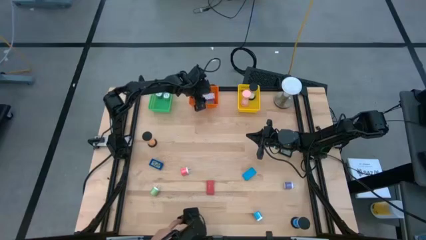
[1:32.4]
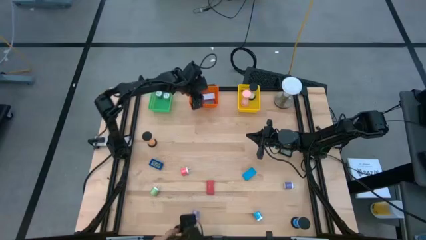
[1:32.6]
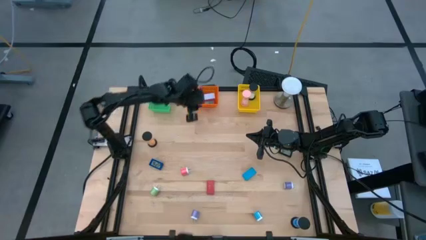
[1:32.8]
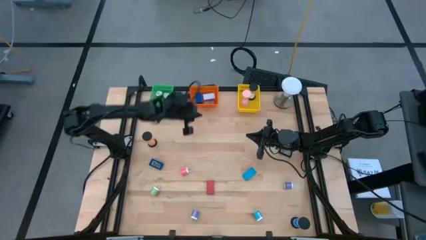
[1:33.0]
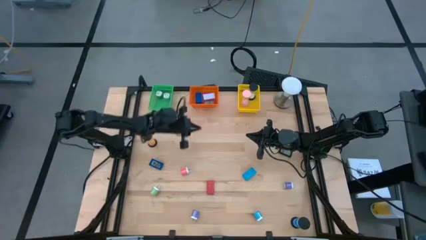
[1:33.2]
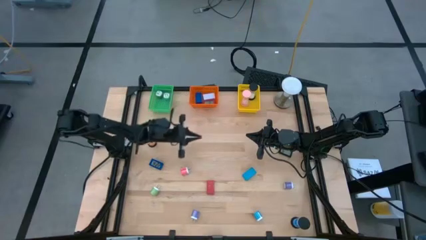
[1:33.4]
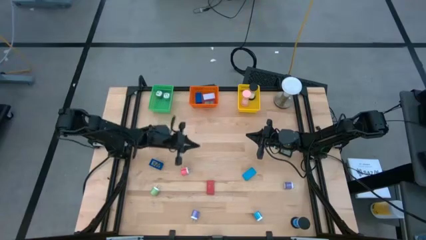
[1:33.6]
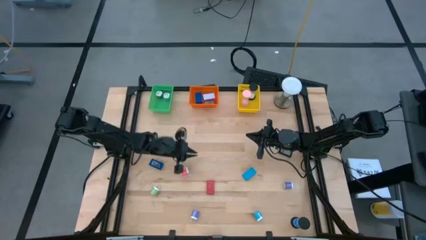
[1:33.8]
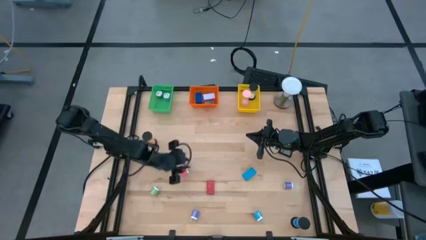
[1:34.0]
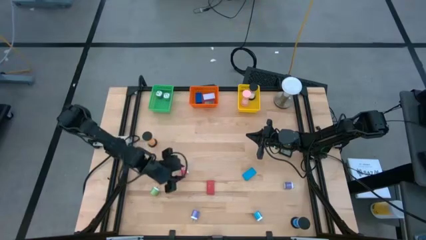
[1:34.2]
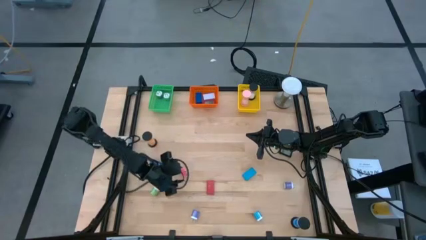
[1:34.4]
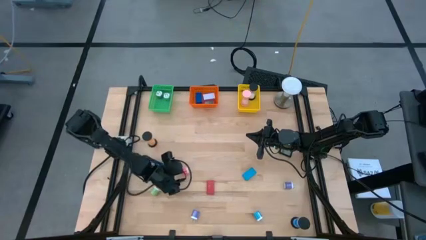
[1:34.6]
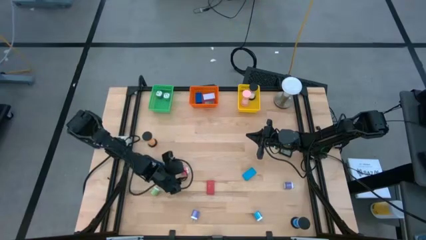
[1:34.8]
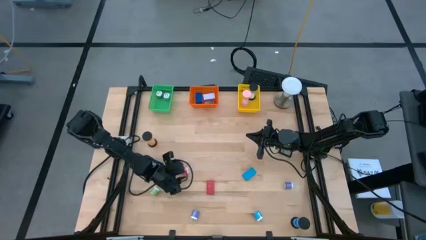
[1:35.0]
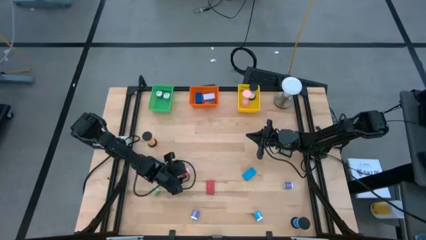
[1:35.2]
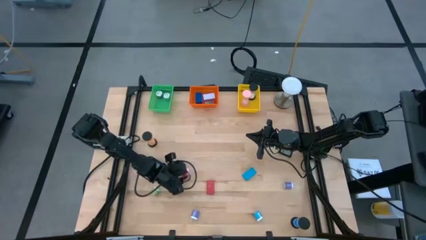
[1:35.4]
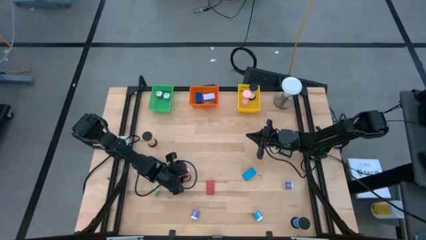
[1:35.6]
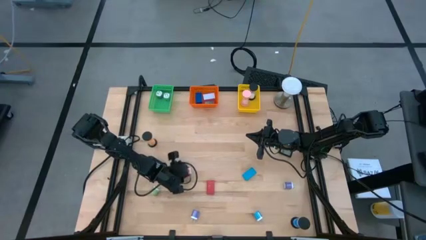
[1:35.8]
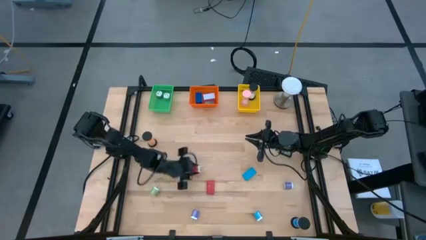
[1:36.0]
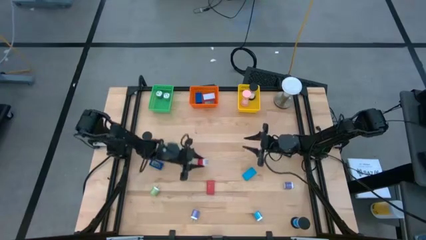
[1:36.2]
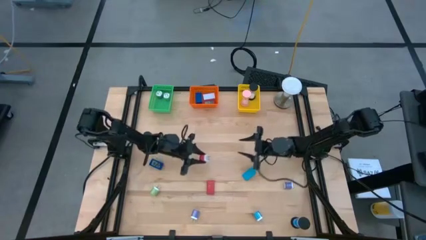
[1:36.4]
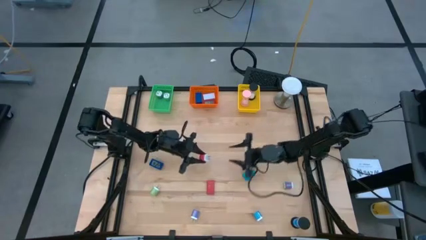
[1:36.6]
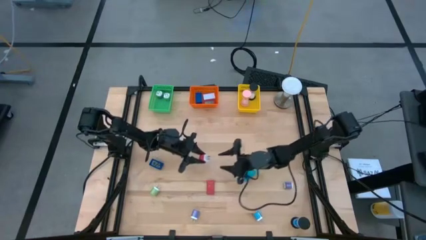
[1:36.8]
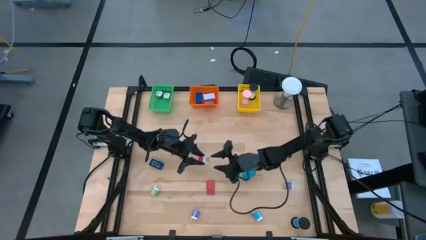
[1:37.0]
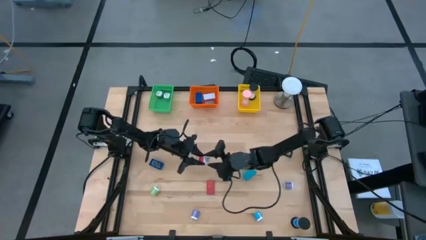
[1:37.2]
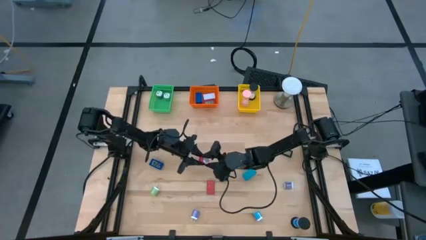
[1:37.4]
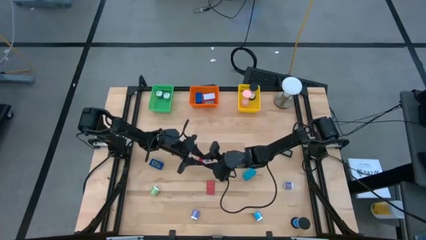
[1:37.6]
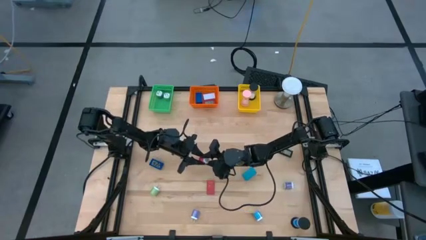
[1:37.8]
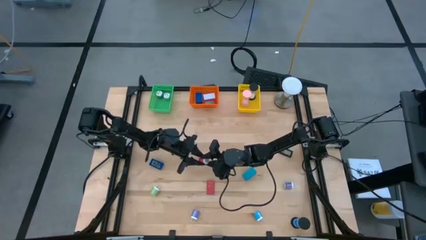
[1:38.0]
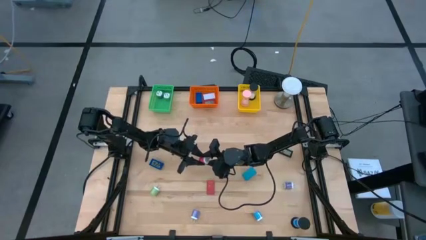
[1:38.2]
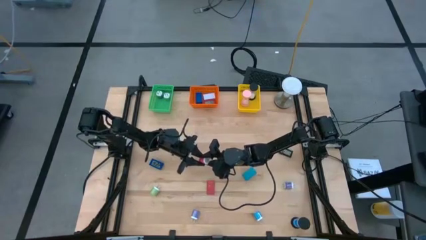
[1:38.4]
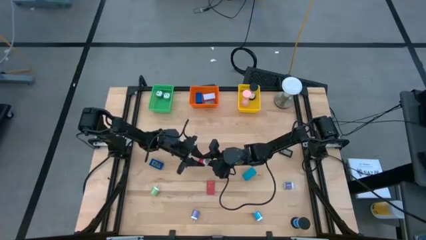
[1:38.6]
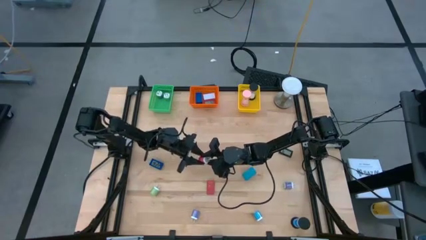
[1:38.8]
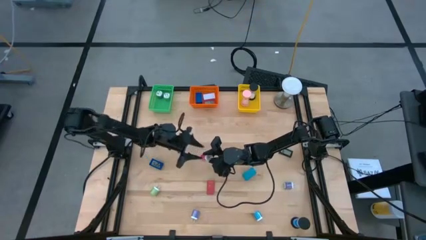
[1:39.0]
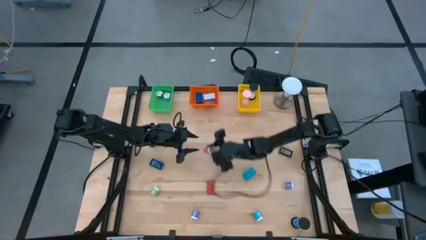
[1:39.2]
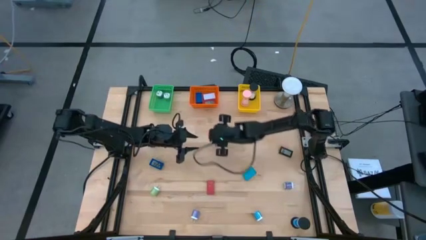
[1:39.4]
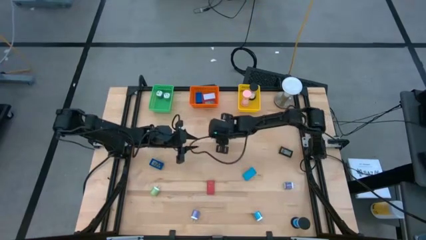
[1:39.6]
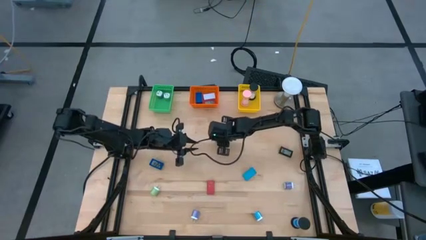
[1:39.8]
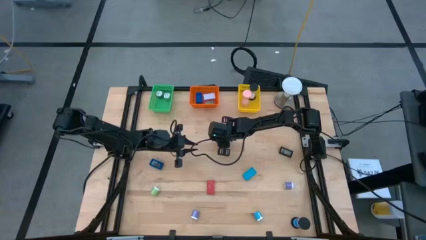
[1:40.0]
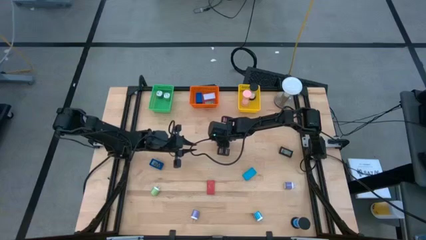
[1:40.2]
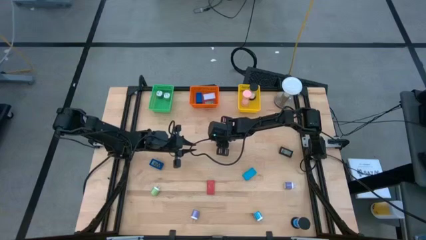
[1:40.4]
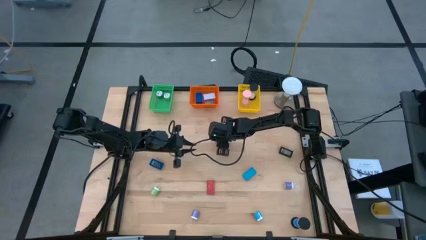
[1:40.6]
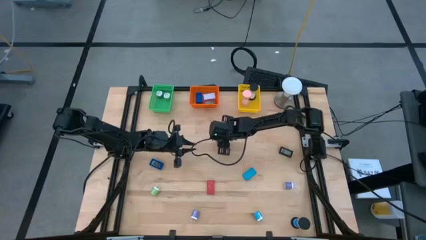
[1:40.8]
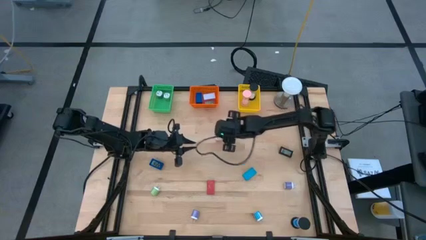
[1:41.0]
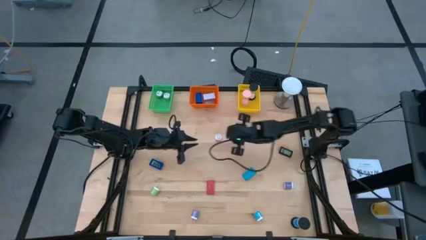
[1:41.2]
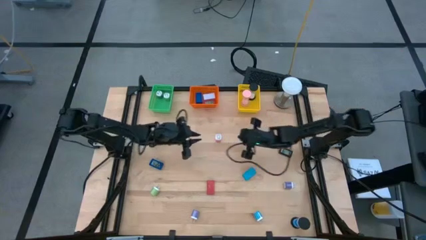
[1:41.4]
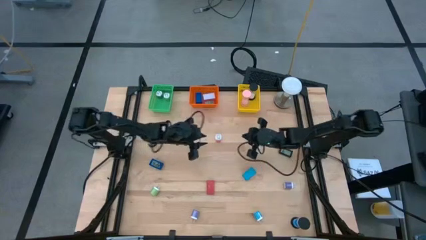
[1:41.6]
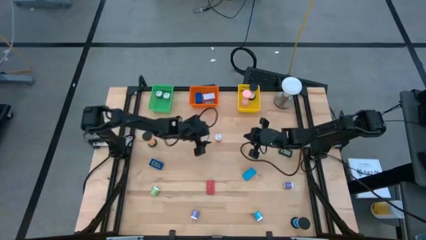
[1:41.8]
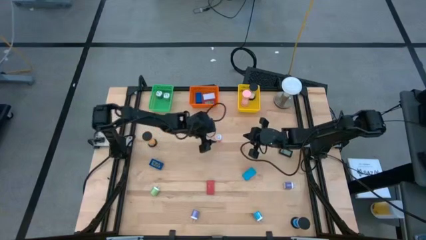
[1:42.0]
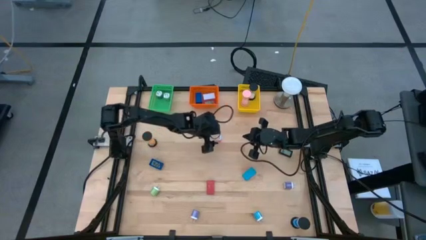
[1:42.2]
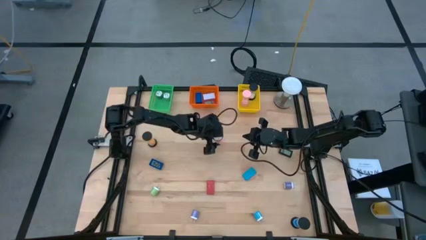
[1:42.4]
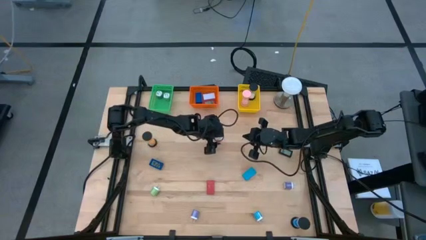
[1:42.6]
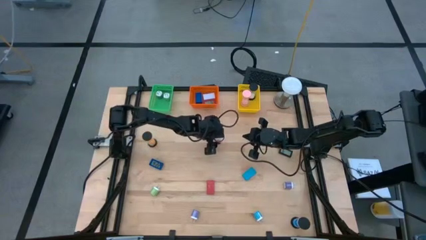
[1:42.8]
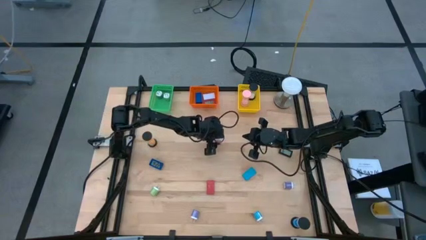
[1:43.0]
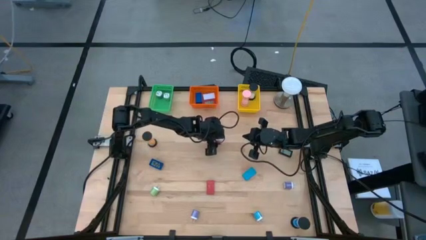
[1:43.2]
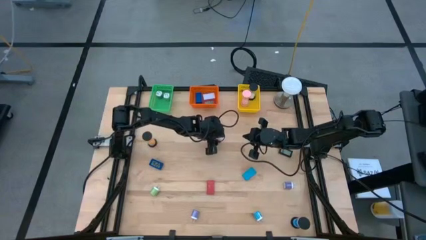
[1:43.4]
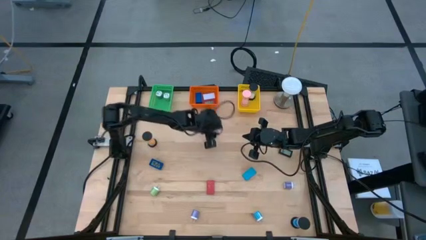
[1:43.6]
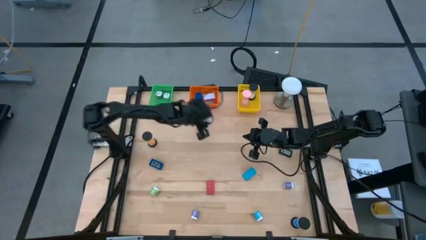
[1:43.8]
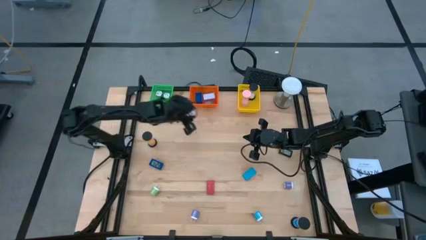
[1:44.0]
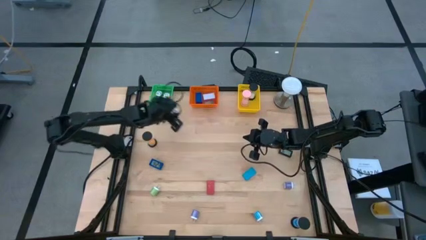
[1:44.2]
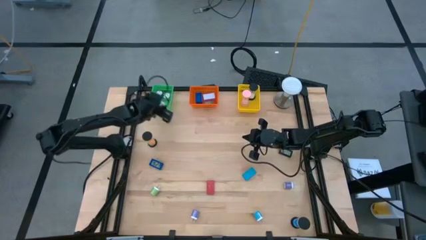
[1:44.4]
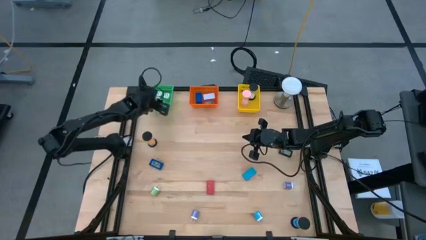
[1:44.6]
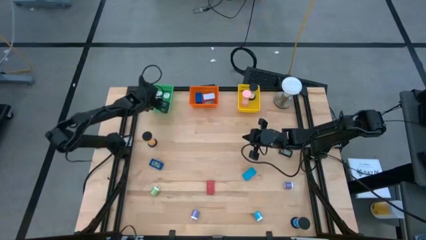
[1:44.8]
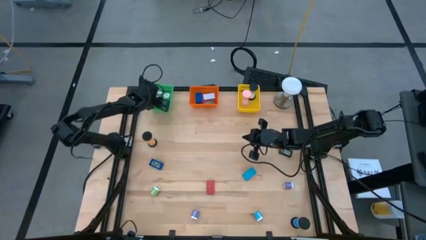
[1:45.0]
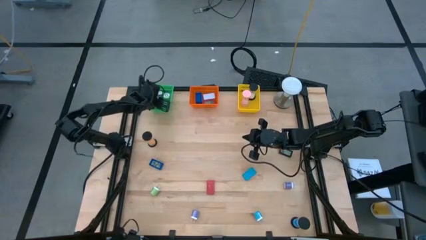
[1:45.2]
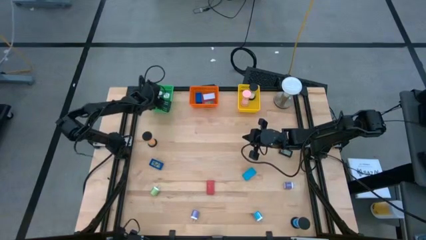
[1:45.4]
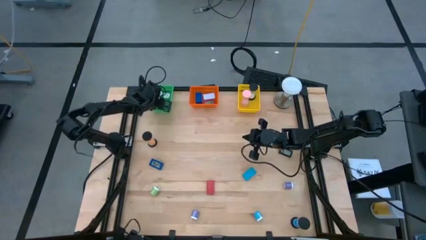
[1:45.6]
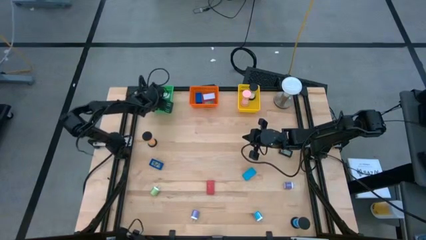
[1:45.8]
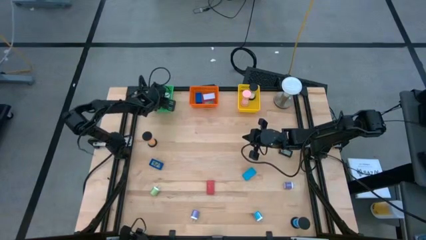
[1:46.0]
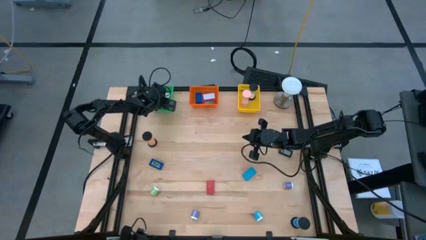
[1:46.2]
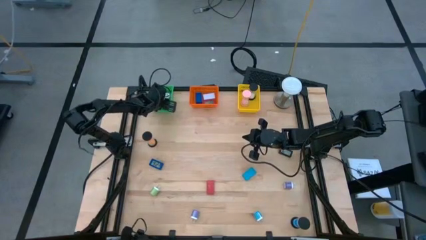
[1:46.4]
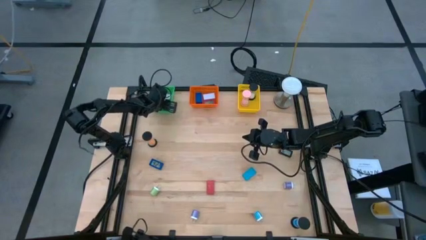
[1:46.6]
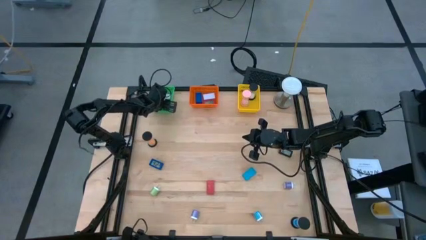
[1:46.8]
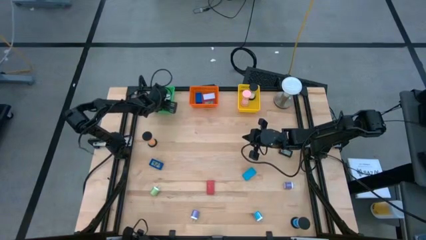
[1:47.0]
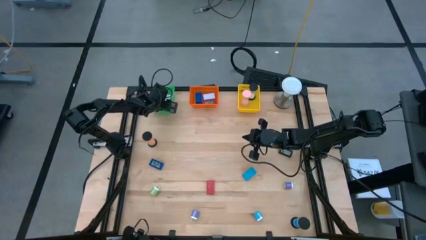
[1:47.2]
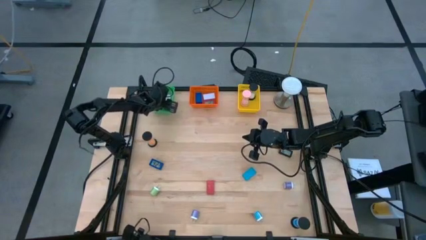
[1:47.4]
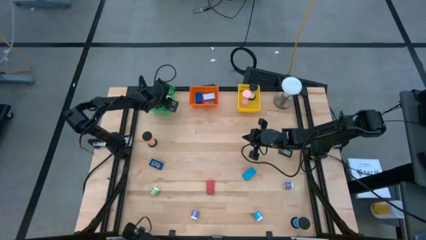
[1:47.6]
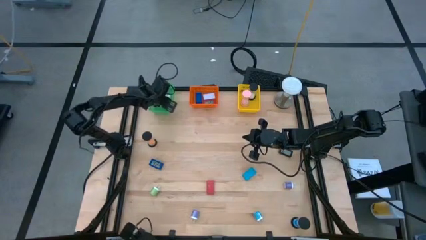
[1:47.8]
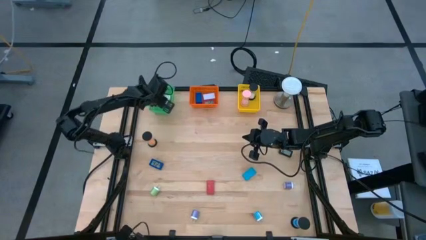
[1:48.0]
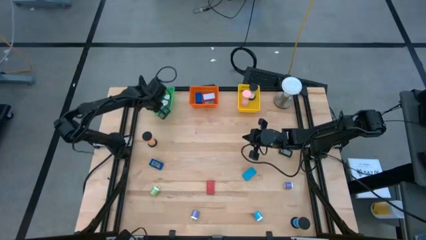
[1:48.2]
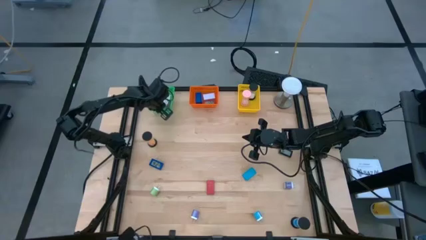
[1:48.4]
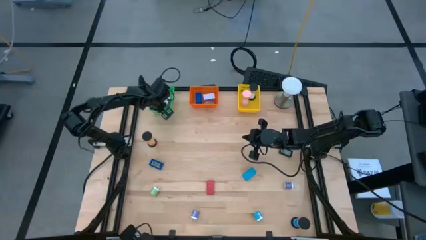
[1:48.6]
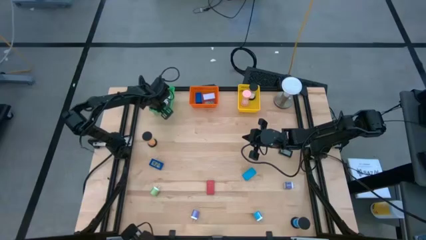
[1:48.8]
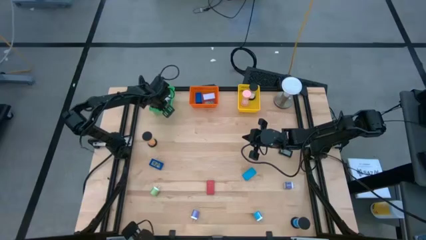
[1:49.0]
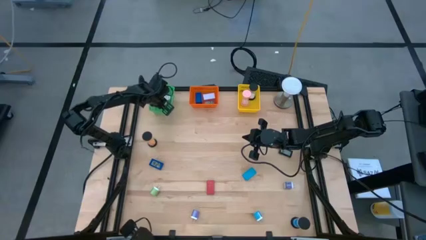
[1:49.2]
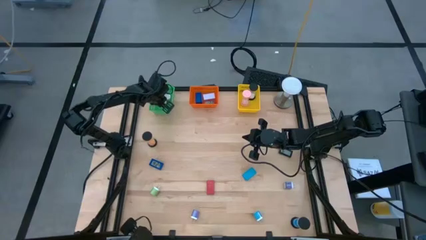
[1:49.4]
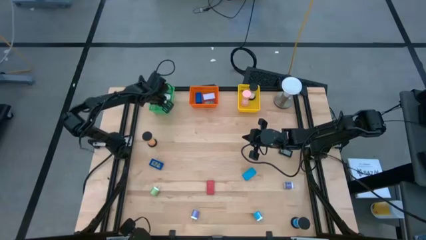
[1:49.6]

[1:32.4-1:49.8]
Task: Pick & Place Office items
Put the pink charger adaptor into the green bin
